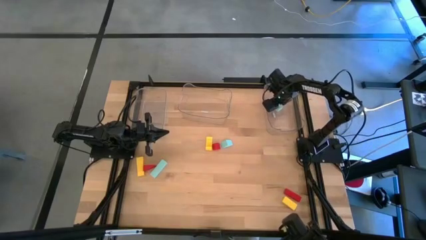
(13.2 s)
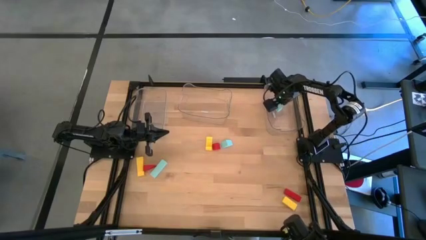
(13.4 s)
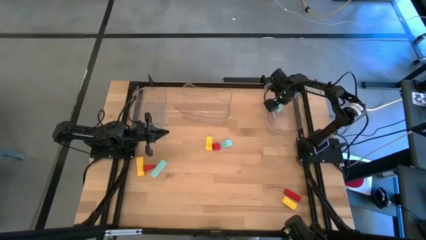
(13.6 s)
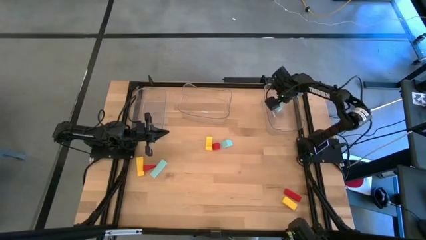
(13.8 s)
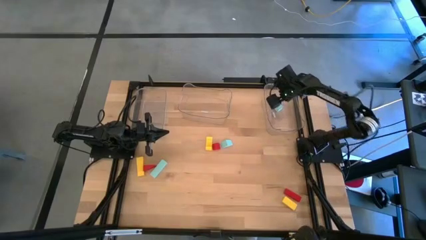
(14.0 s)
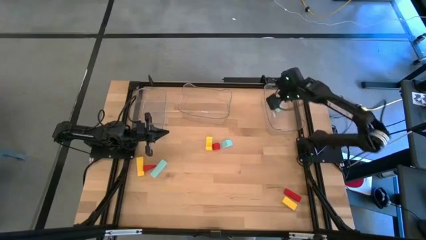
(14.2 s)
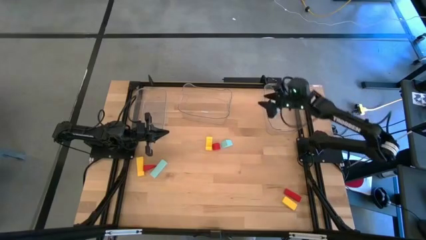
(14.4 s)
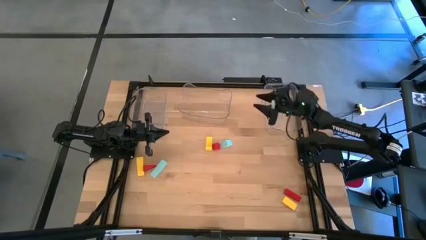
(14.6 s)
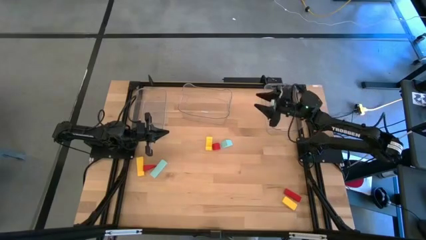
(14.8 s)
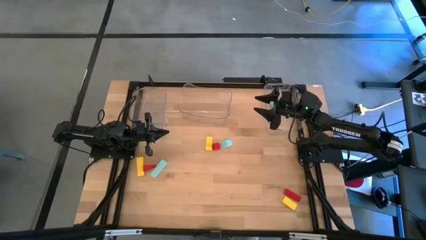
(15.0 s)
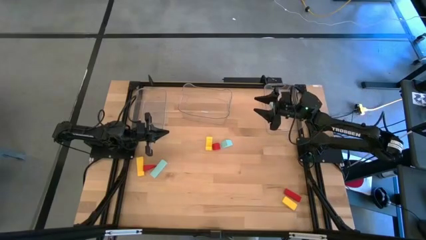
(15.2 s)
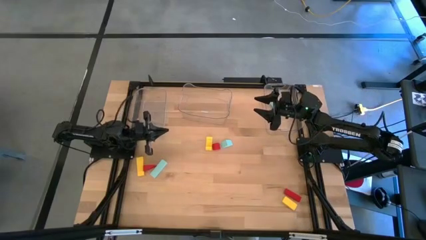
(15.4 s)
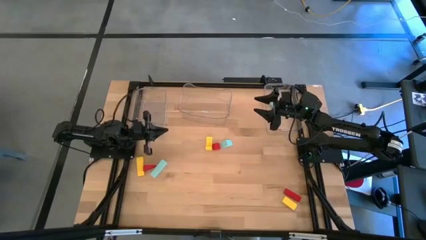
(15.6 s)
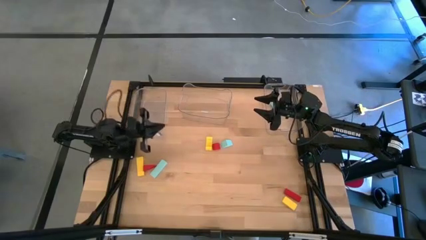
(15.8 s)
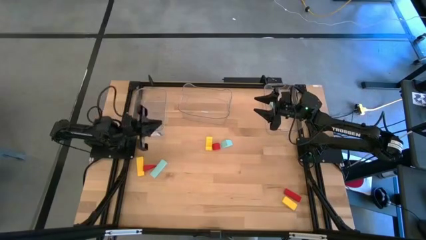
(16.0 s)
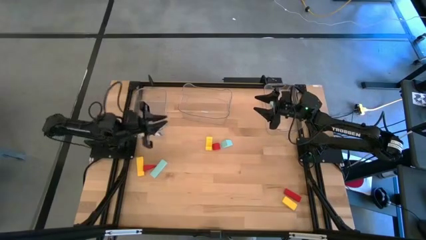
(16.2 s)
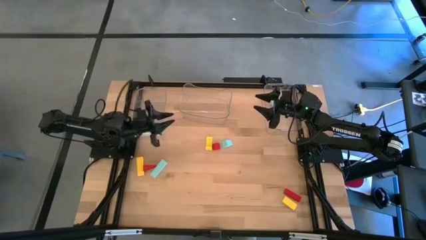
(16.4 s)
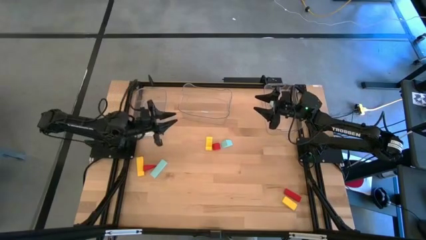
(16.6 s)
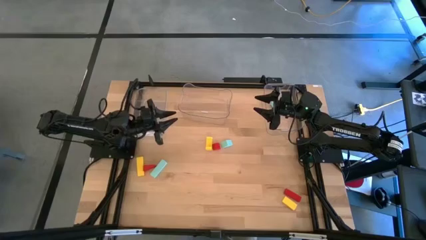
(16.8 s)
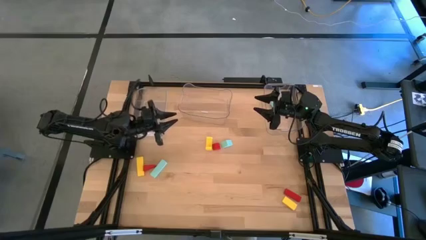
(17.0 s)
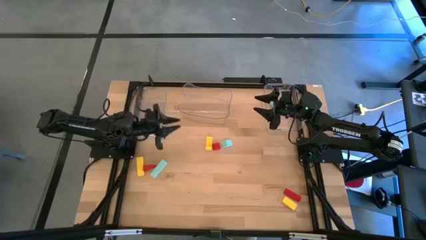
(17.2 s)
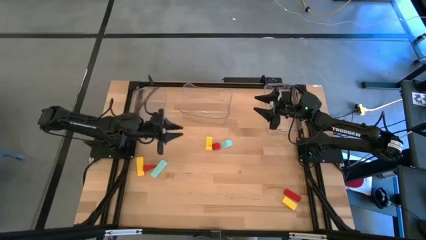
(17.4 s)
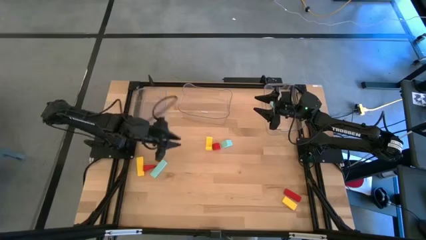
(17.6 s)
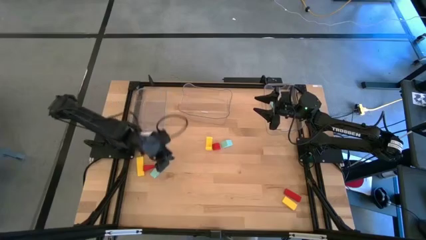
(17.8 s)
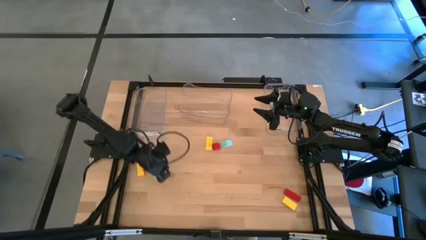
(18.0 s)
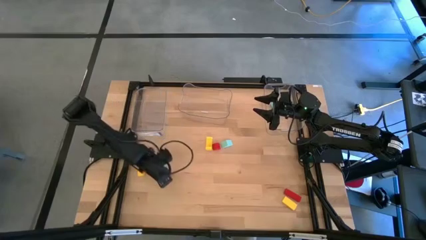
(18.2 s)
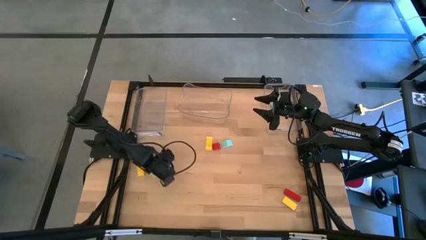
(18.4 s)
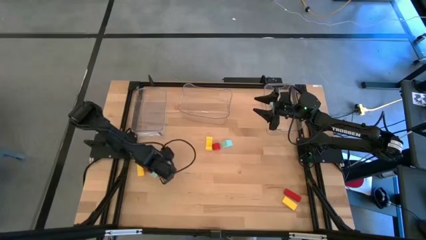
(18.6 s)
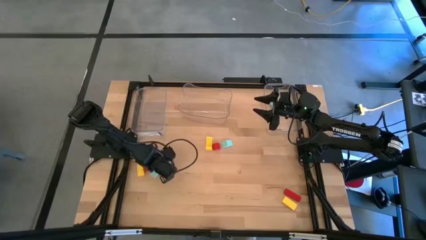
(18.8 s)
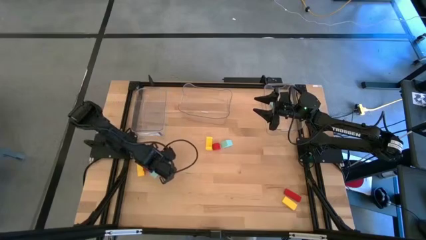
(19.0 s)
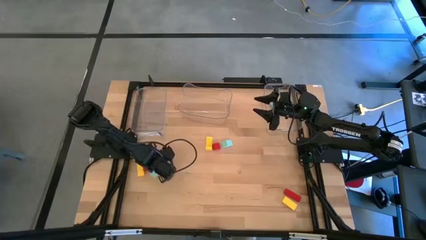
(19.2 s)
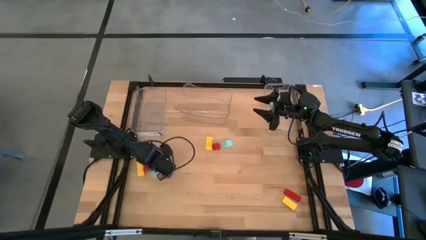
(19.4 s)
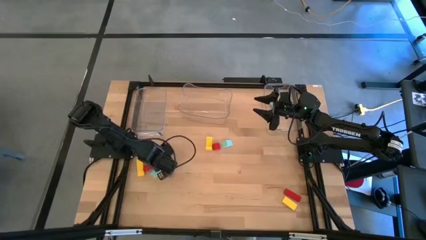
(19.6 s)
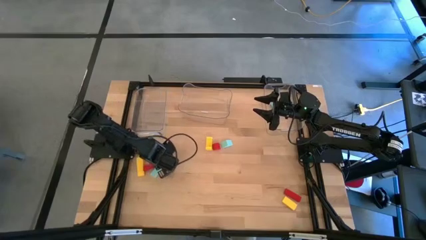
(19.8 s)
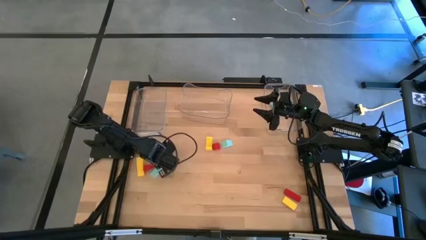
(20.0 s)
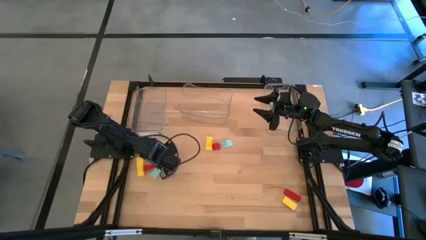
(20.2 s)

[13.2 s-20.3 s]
Task: Sort & place blocks by color
Put the left light blue block into the right transparent bin

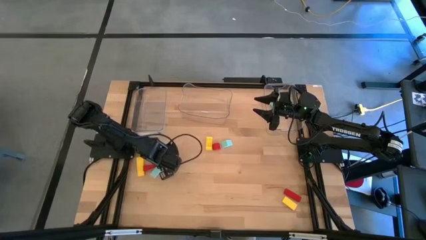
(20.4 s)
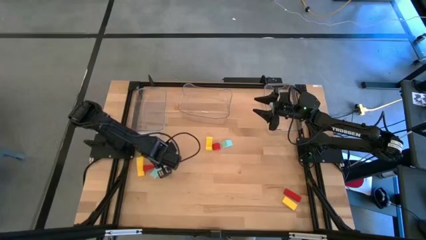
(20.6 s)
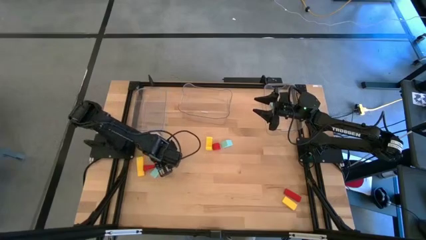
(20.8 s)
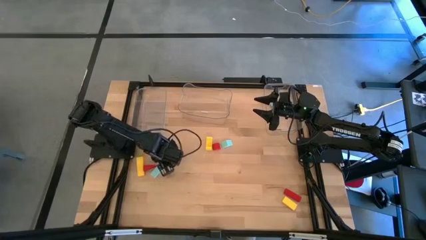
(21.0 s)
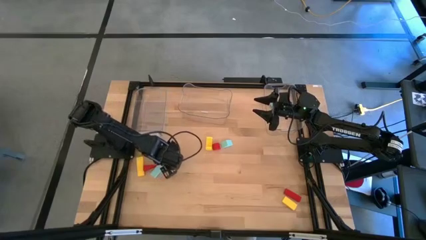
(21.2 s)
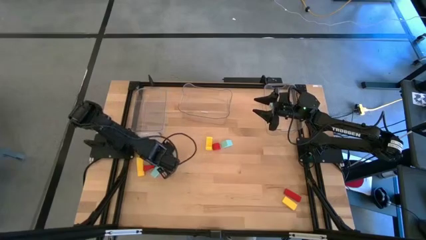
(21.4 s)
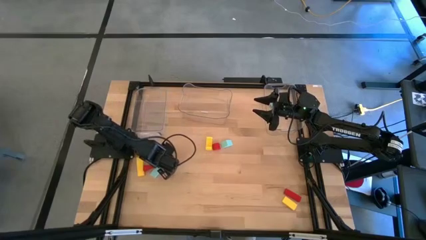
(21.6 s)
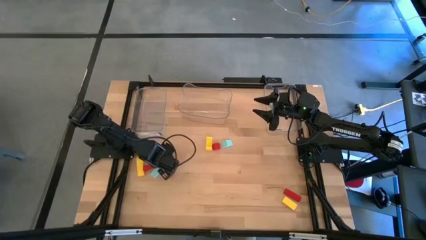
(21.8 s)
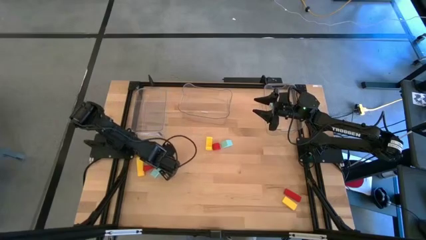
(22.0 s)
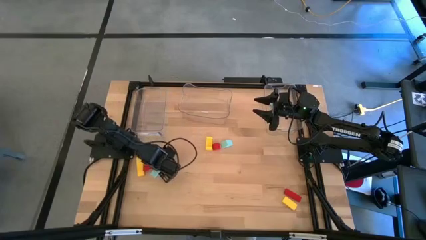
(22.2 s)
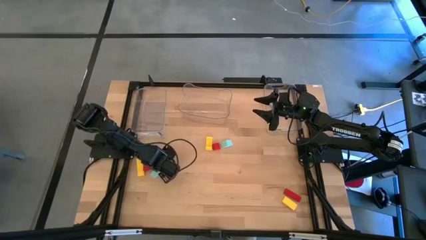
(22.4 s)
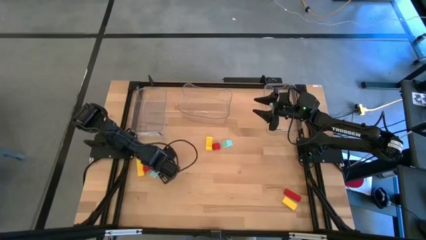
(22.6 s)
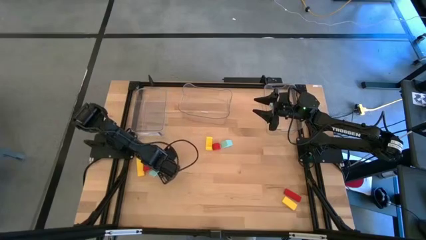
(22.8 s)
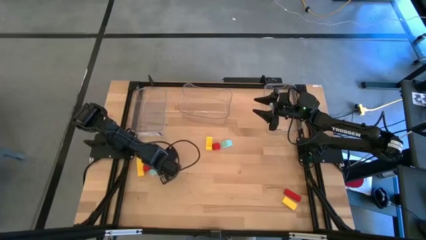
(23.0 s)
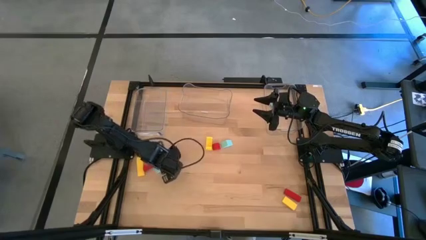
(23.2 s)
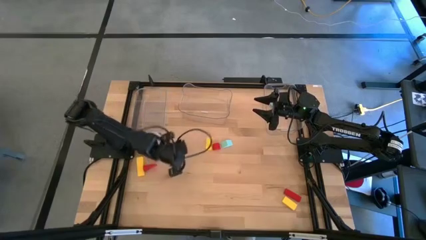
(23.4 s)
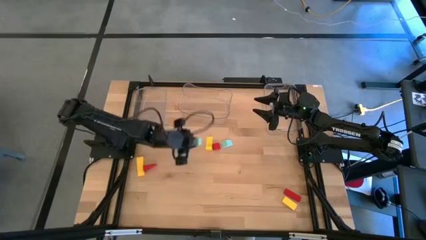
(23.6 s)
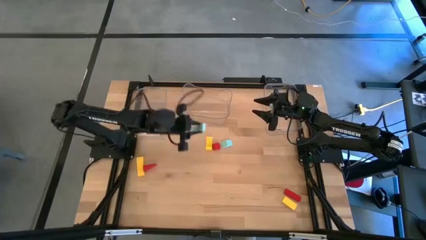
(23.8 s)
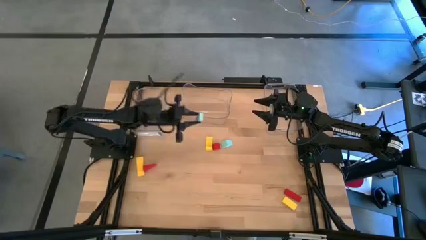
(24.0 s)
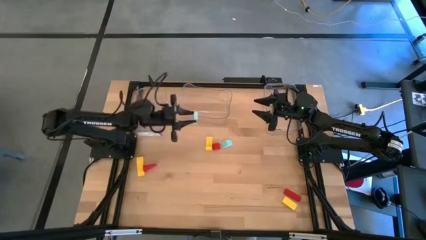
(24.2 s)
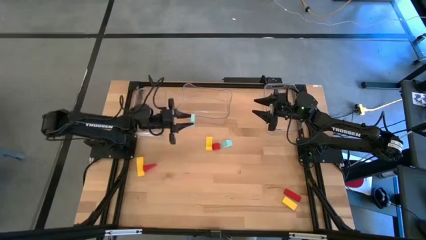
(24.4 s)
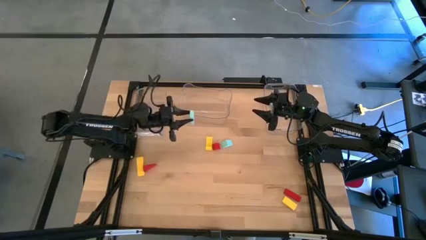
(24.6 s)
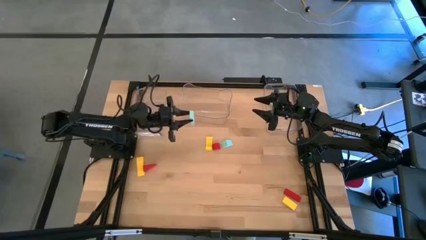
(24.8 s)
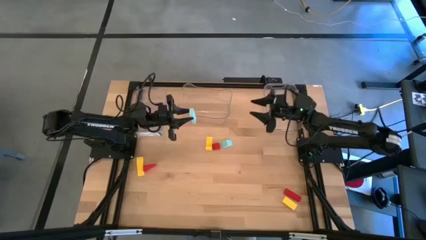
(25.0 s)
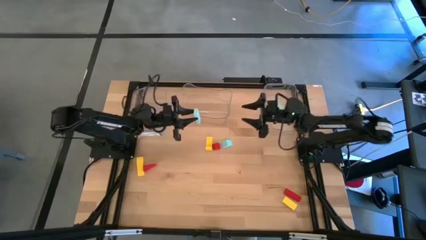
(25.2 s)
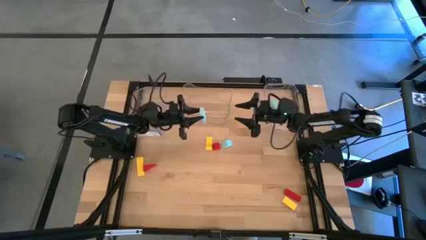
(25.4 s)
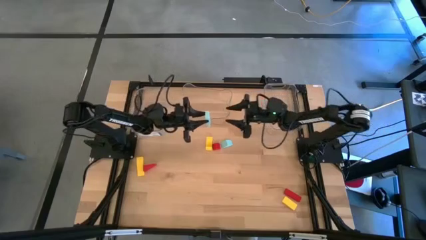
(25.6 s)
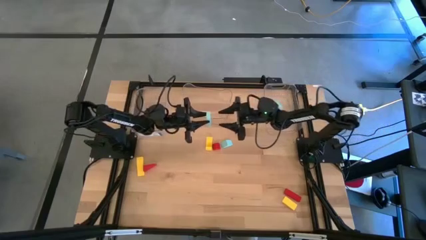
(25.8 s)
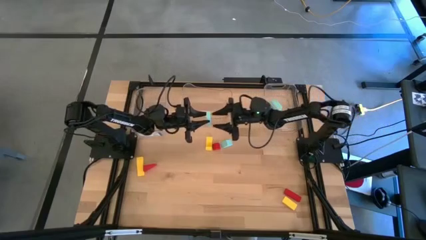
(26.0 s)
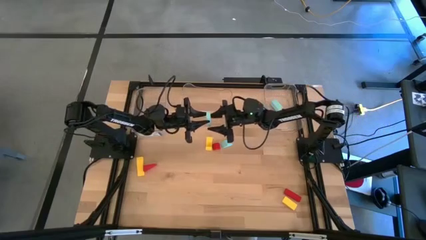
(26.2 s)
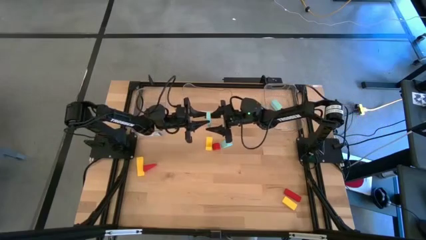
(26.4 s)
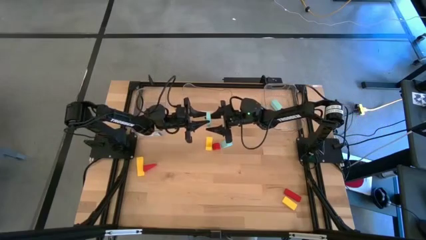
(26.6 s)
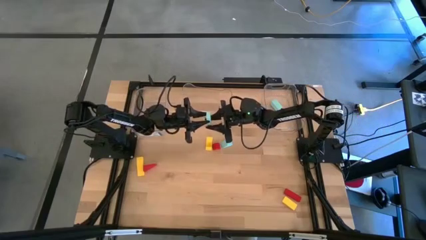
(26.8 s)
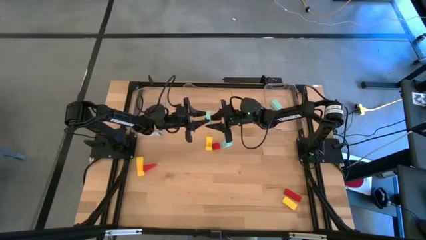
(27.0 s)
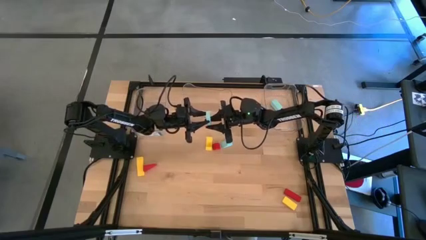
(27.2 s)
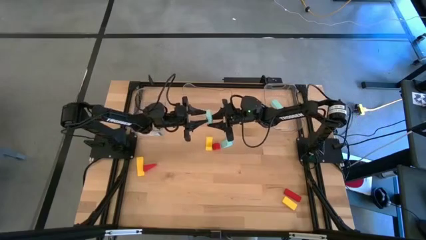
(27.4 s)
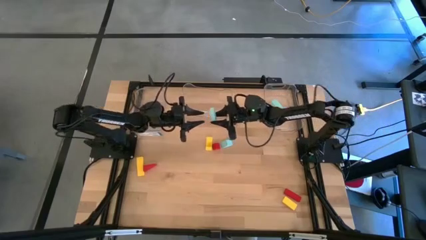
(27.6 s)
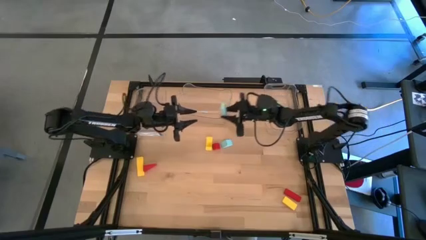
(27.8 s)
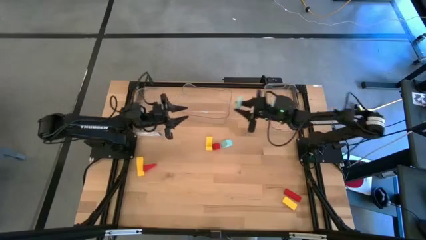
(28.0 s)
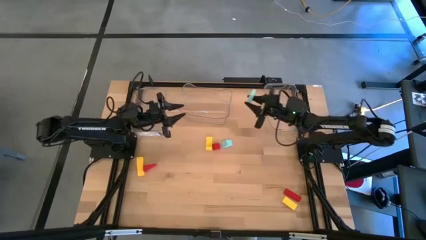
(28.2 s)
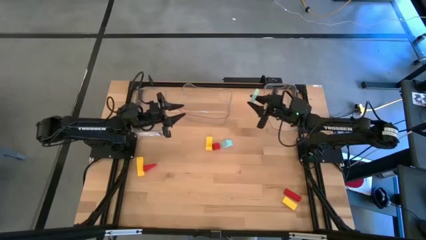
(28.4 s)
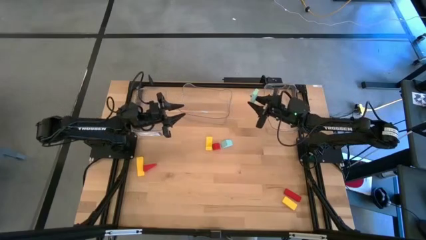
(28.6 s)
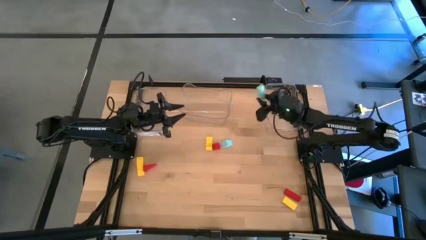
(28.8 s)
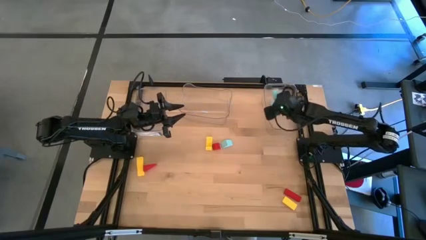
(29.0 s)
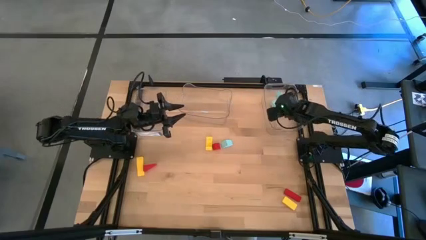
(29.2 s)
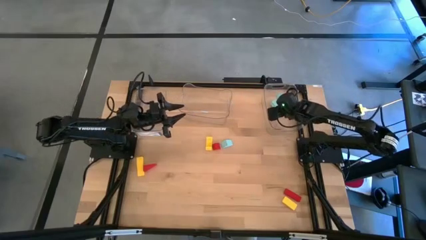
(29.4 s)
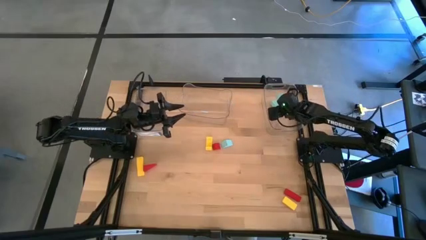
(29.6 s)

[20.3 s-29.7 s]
Put the left light blue block into the right transparent bin

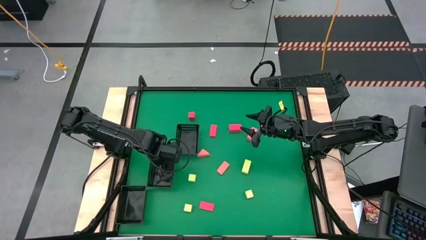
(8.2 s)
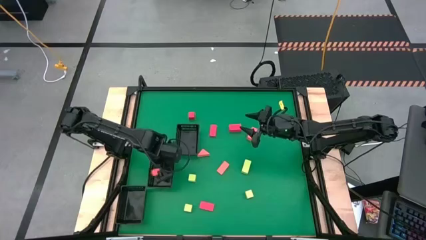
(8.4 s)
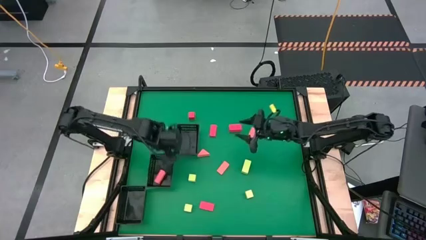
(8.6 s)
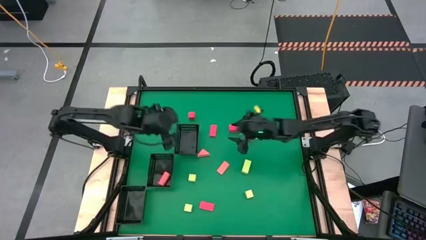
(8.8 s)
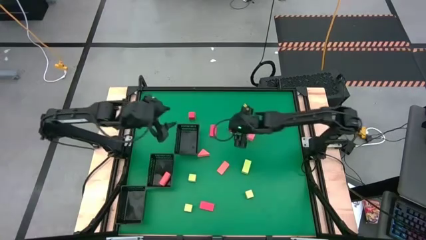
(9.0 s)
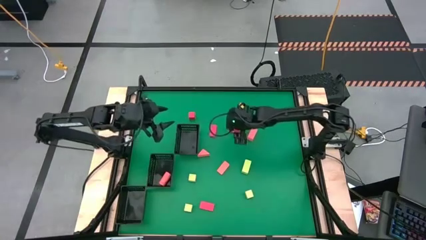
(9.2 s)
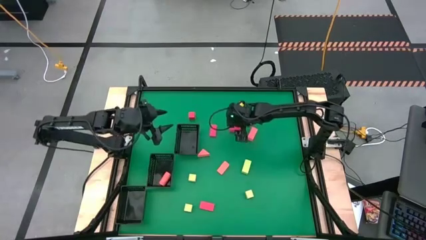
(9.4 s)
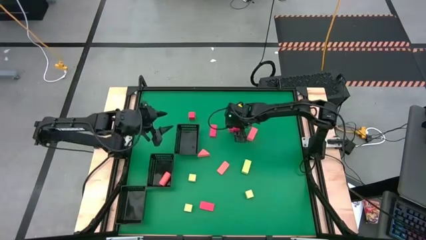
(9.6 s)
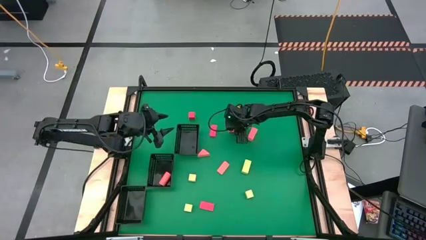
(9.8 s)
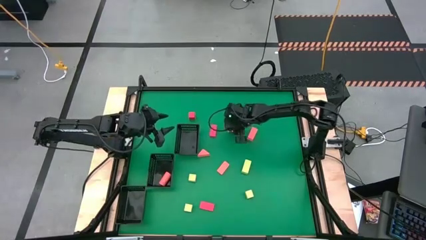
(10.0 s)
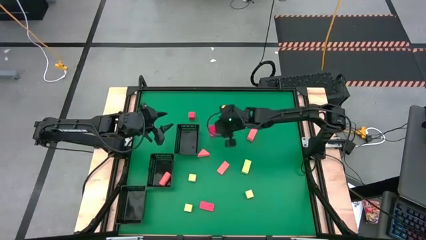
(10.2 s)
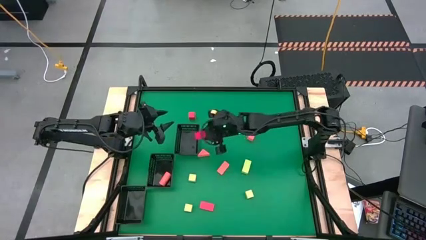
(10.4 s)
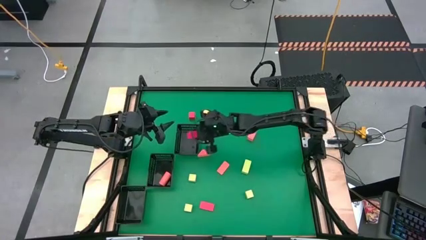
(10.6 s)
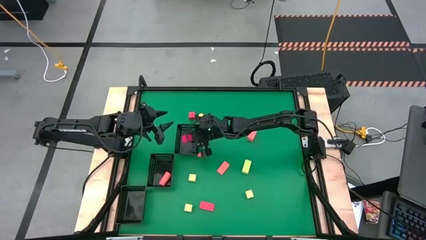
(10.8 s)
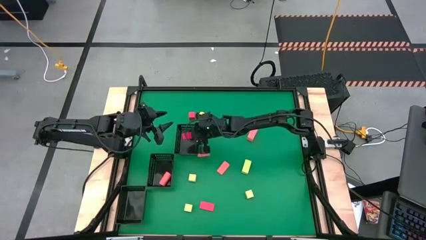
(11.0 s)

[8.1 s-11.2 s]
Task: Sort & place blocks by color
Put the red block into the top black bin
